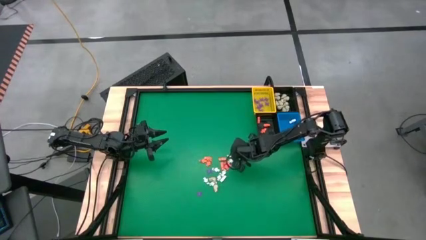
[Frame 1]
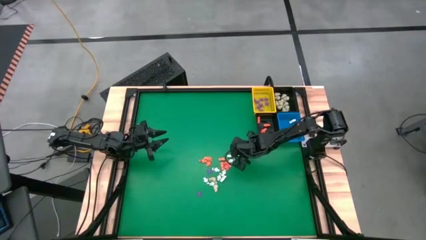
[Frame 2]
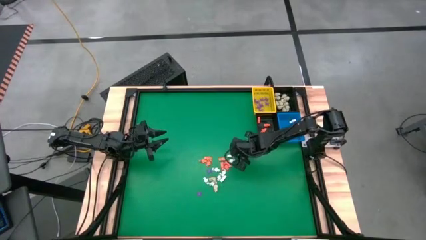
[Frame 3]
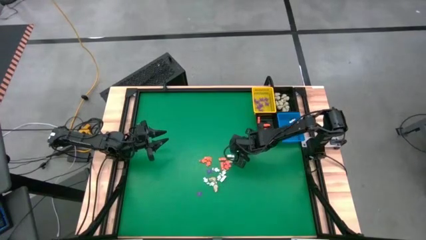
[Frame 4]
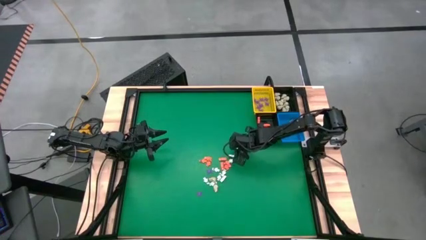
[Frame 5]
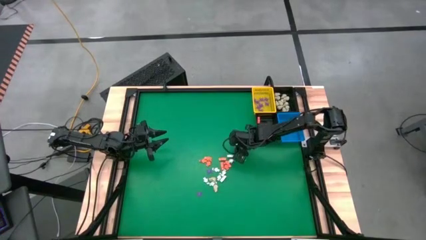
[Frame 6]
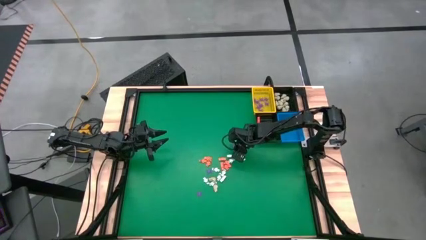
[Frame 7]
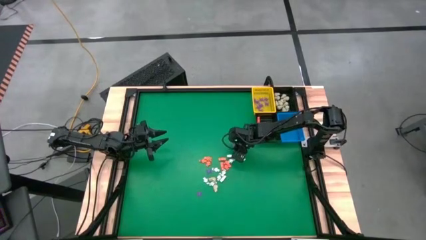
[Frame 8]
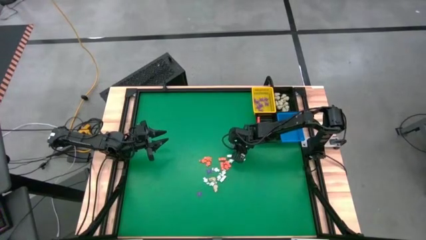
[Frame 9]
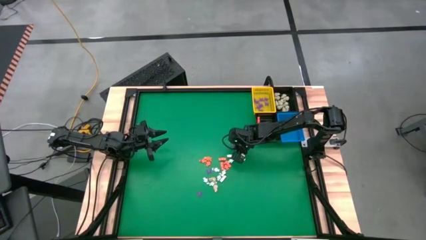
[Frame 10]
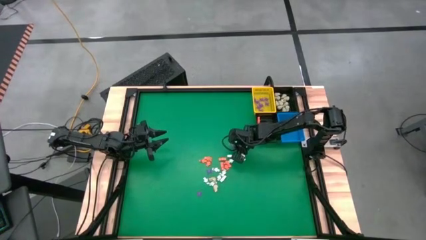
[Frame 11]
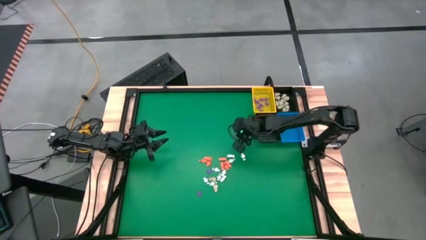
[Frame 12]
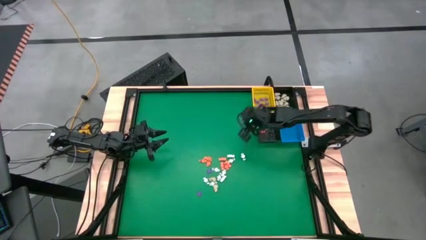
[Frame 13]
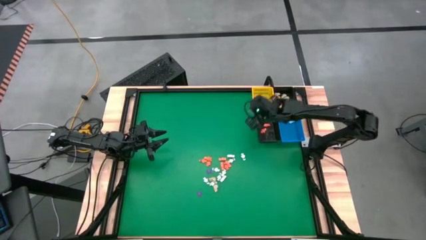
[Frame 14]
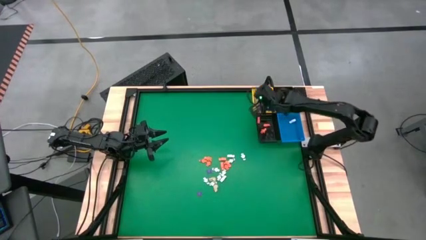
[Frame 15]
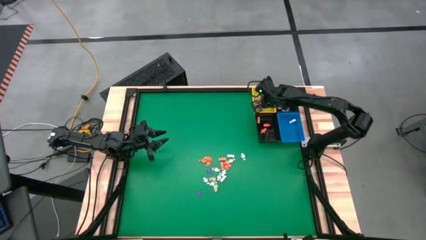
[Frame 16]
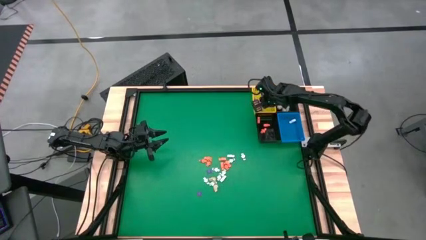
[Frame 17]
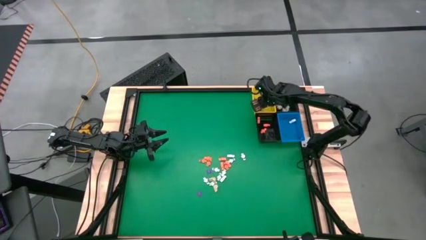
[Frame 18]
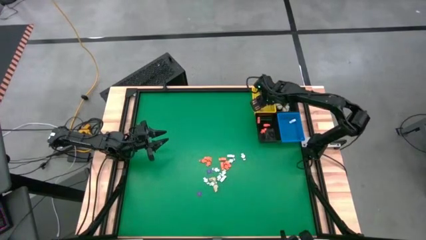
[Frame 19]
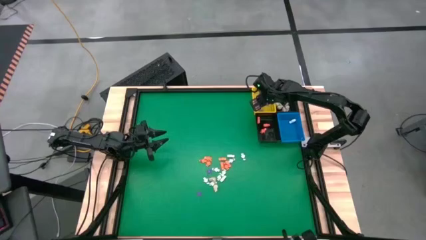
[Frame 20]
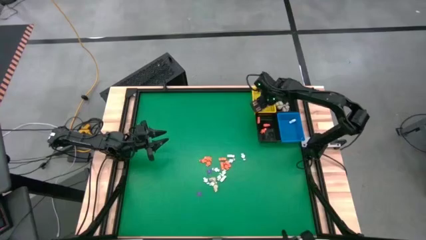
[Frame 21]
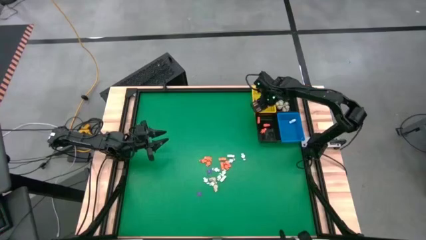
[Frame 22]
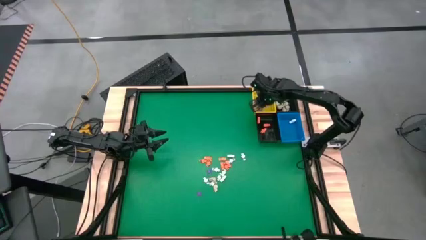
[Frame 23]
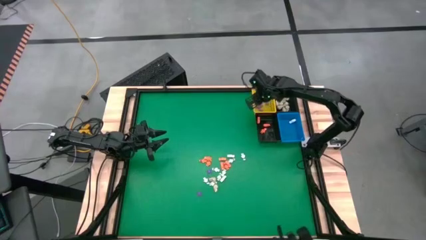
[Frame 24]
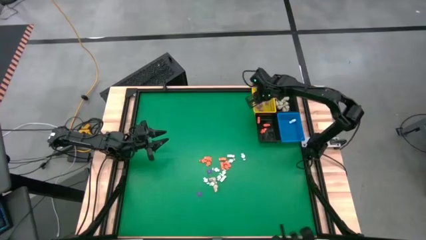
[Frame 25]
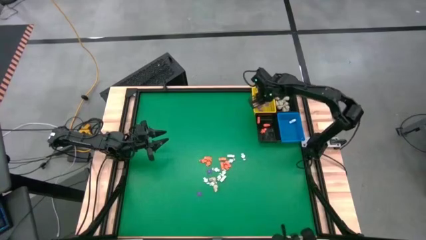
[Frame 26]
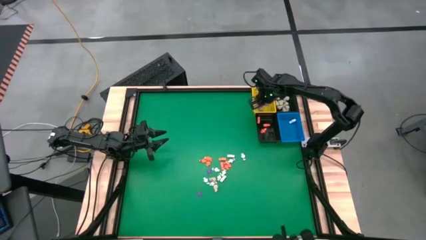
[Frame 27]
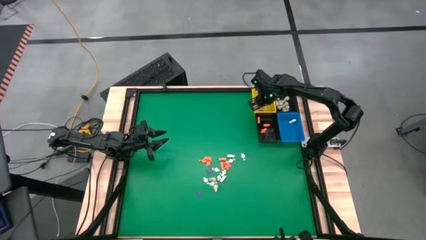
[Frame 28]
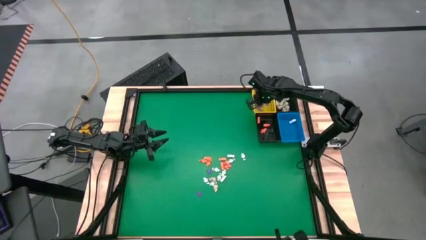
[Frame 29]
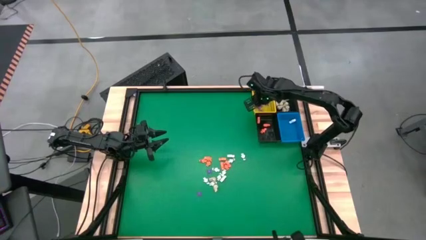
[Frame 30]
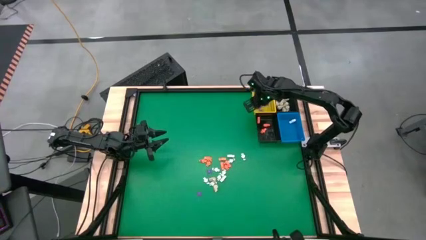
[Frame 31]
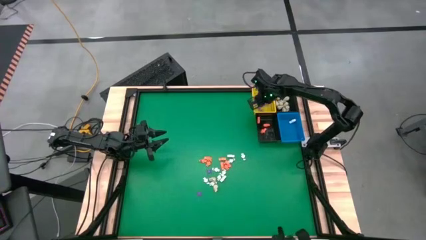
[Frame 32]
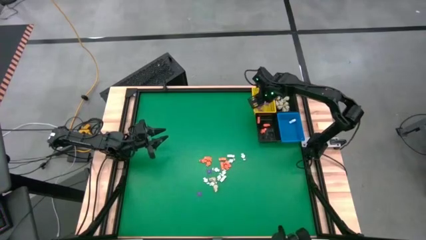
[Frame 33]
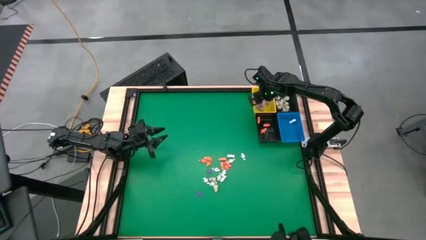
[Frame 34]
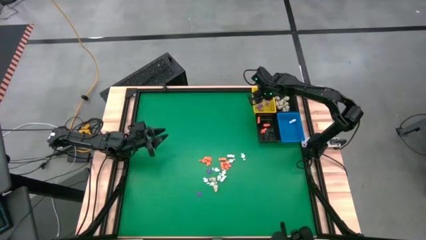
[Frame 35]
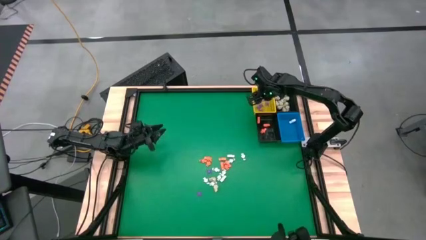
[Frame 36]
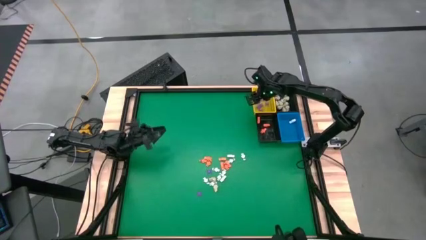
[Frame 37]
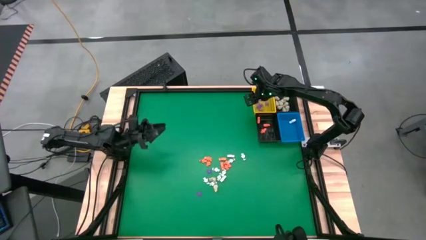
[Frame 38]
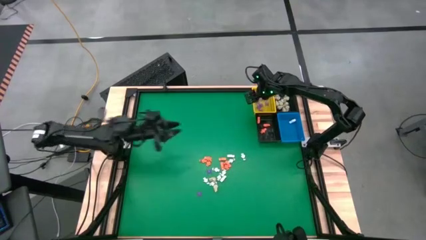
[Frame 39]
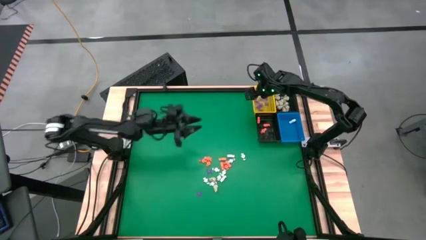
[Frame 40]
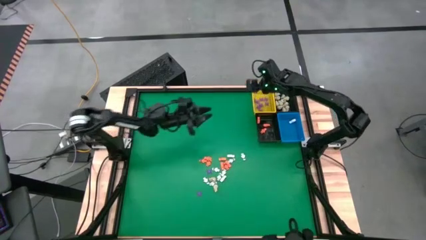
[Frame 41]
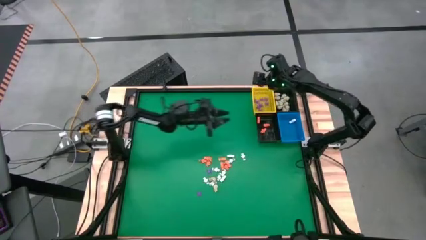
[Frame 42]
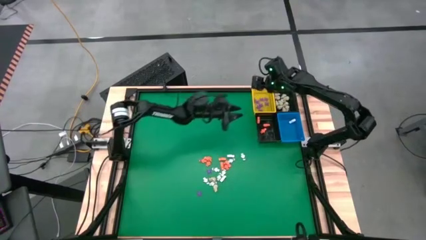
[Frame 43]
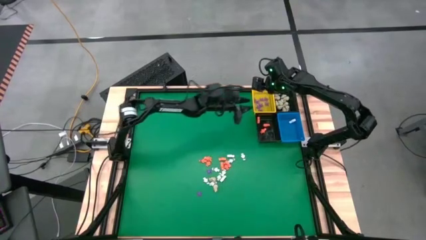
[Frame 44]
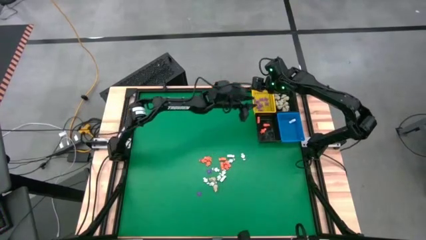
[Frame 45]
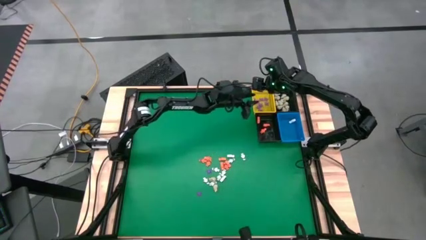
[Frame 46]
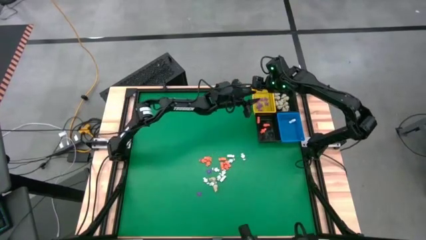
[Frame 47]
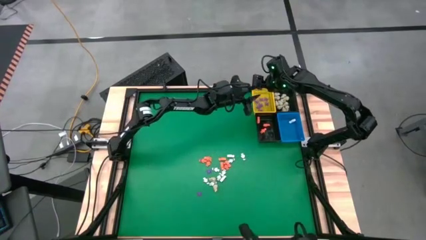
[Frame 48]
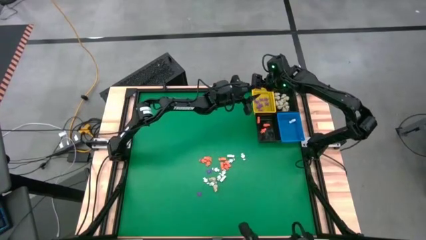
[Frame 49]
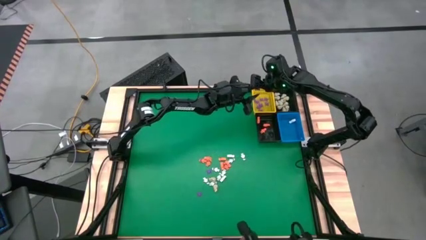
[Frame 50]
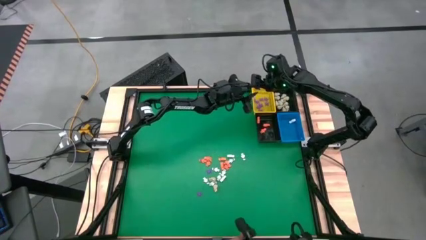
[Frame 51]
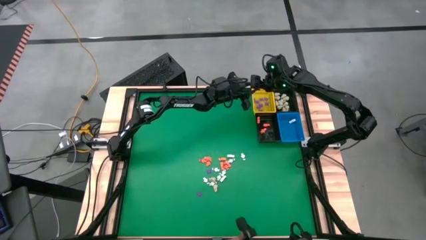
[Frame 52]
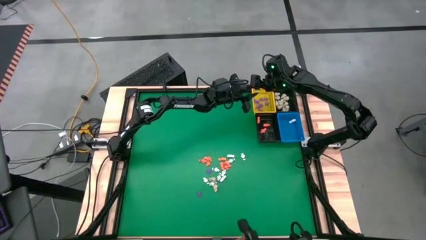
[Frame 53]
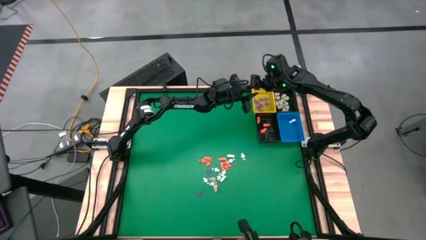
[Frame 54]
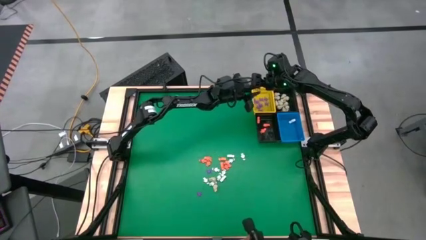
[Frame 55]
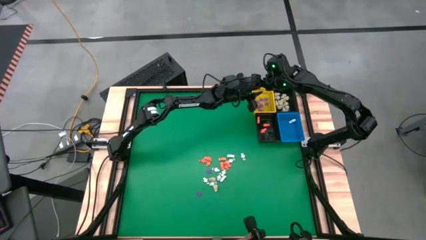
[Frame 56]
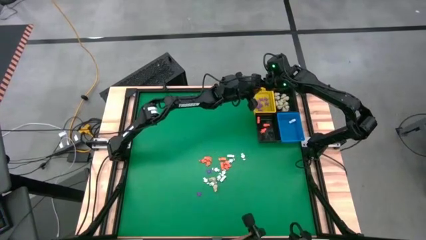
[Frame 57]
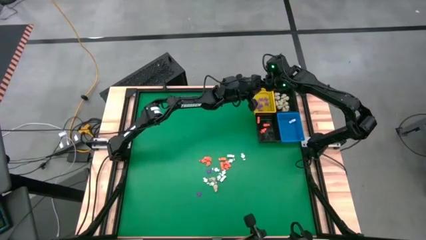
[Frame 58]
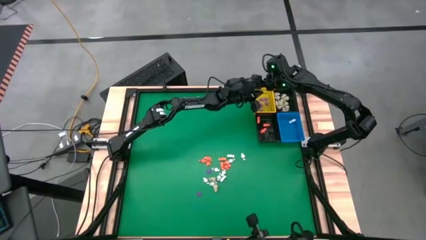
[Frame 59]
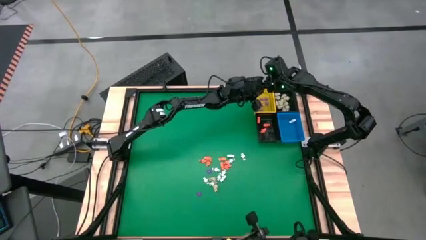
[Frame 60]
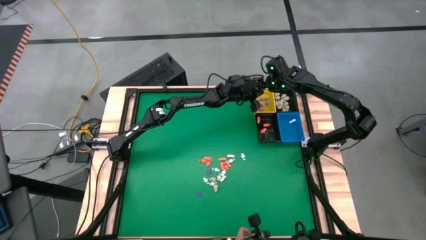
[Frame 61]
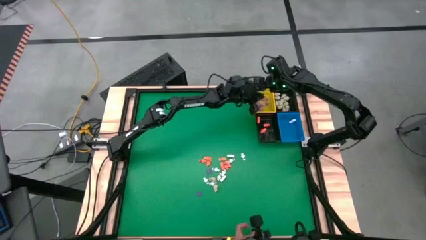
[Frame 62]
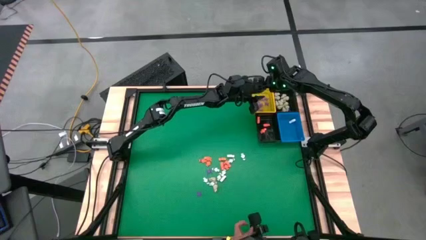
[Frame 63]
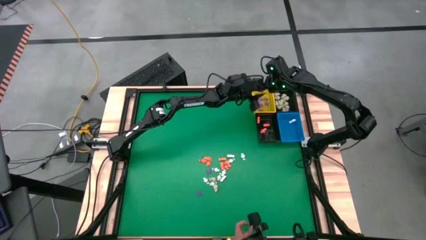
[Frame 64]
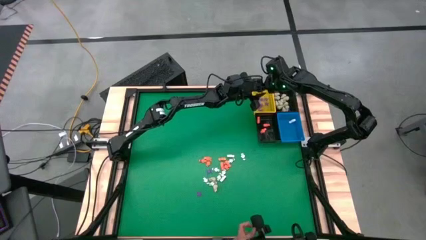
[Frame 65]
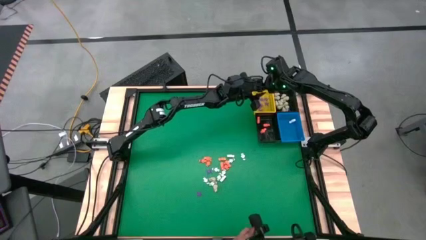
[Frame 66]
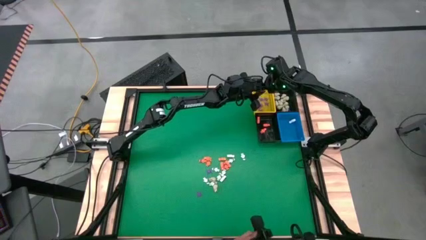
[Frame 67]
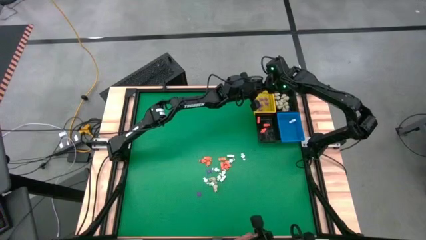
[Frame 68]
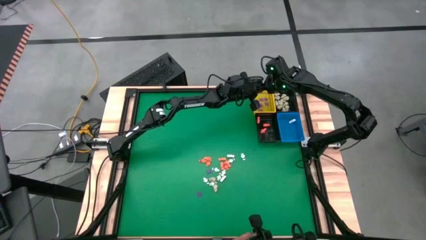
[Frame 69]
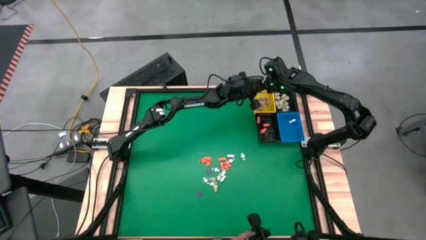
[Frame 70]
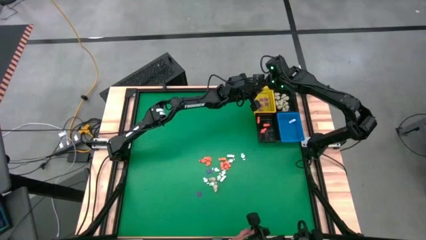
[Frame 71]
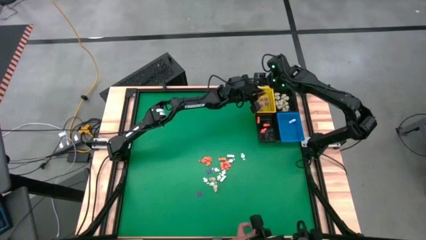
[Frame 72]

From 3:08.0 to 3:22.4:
Task: Sort Halloween decoration
Put the purple spider toy into the yellow basket
